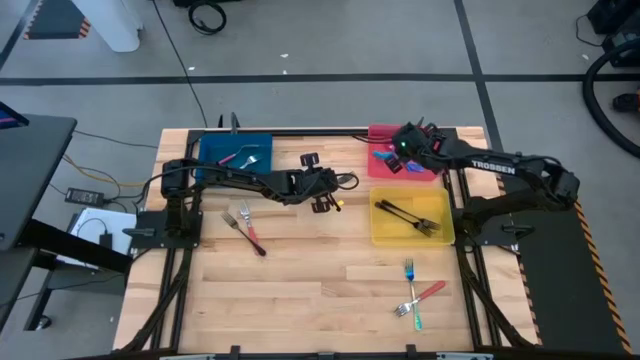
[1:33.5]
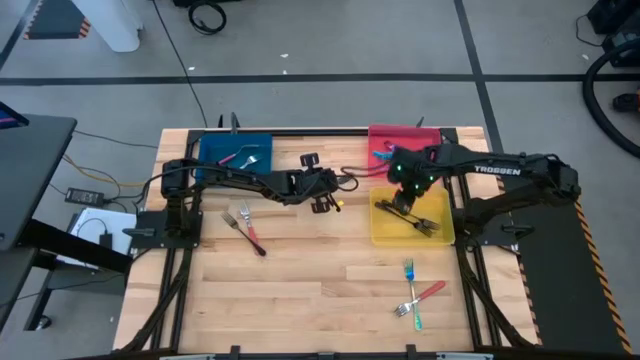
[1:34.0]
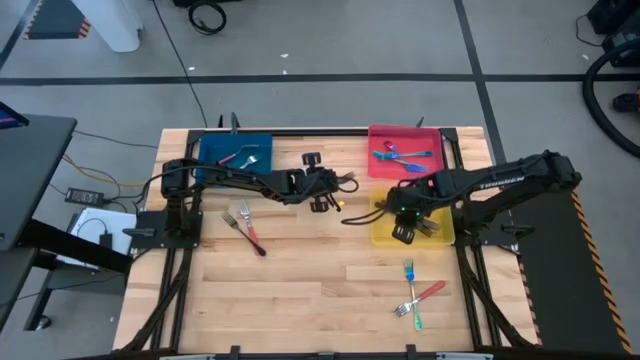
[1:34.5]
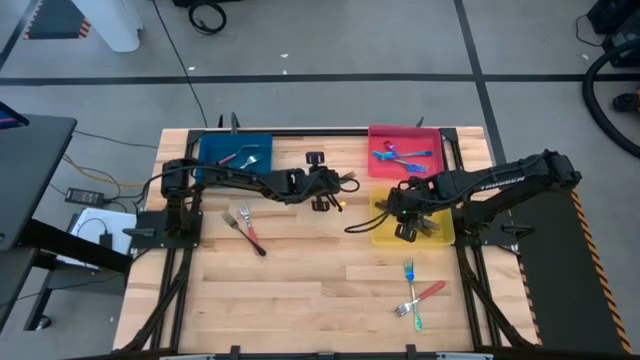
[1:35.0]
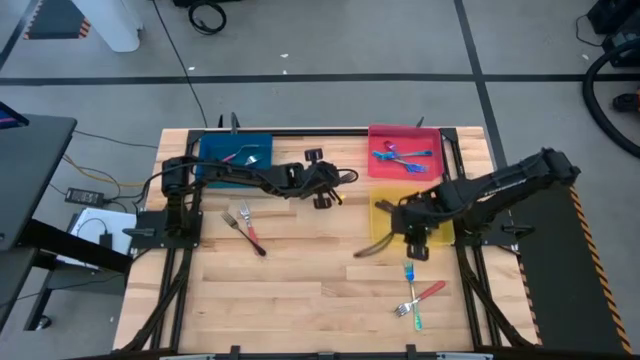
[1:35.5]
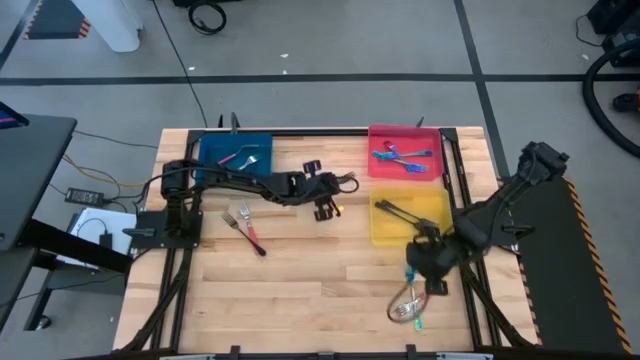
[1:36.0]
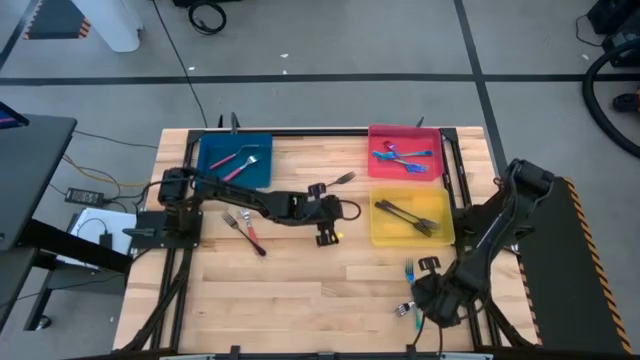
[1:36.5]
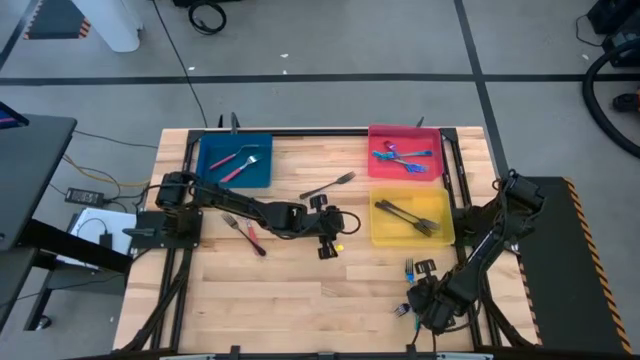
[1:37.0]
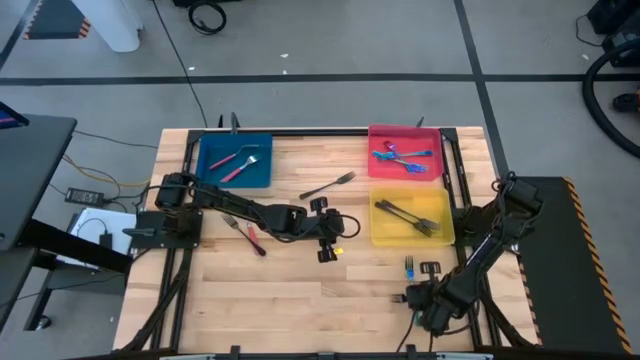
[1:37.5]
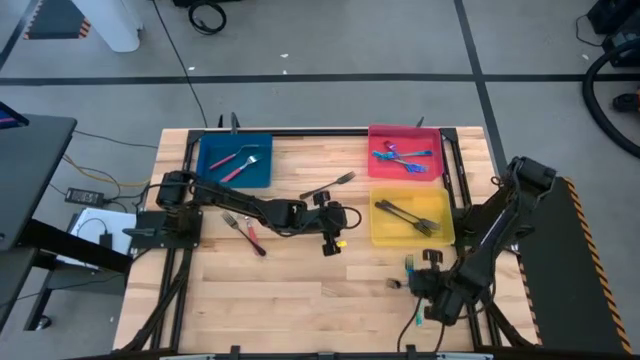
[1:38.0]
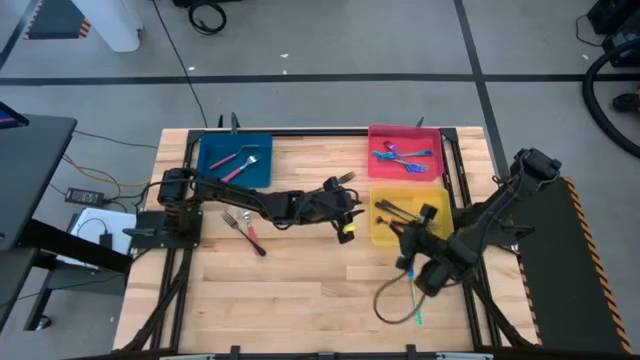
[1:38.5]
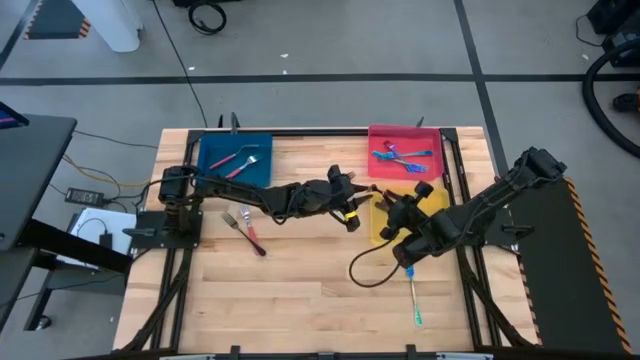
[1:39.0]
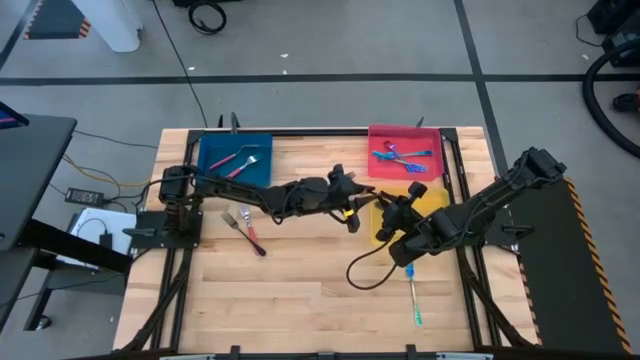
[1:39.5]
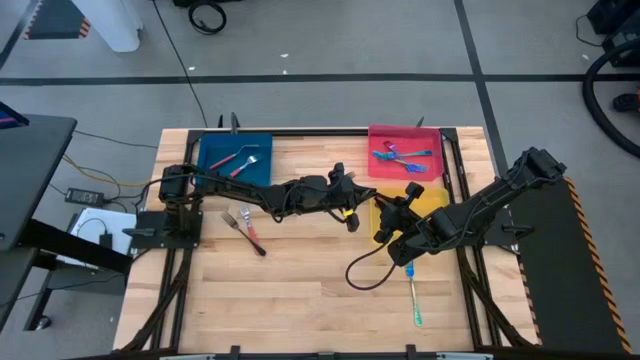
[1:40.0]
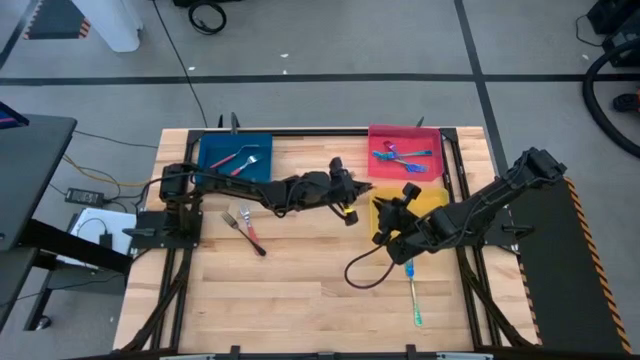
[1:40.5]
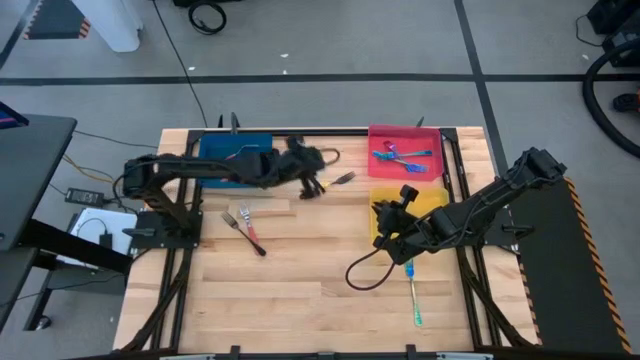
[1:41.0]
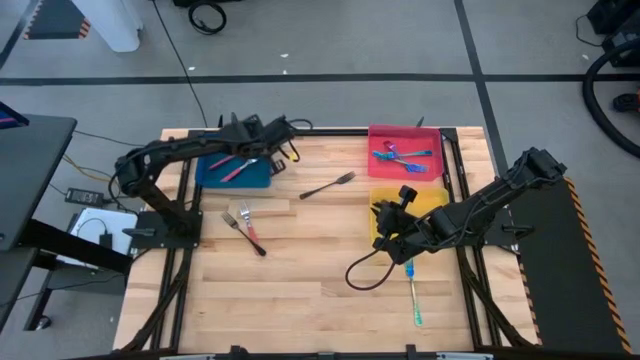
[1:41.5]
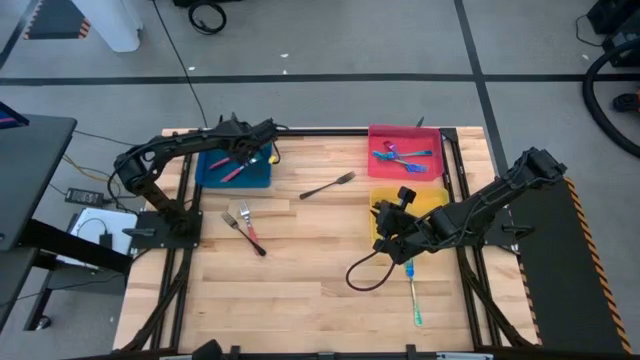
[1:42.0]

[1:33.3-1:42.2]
Task: Sort silverware by color (type)
Put the red fork into the blue bin

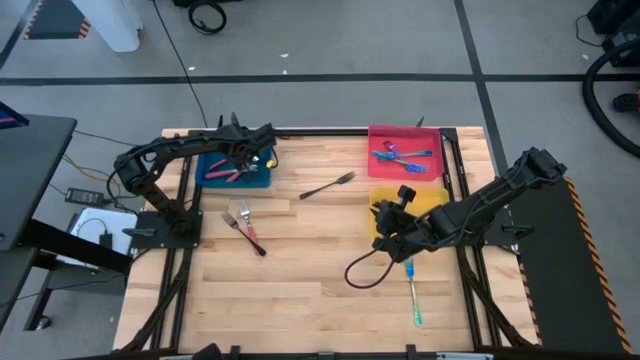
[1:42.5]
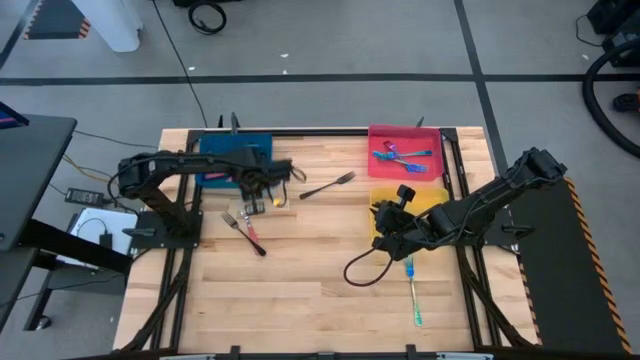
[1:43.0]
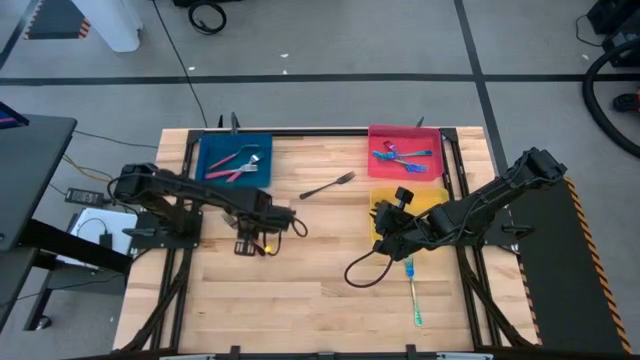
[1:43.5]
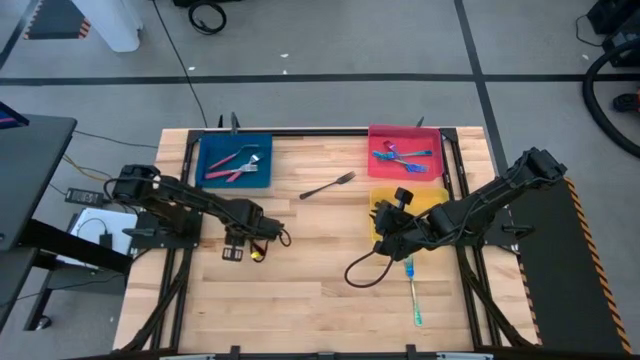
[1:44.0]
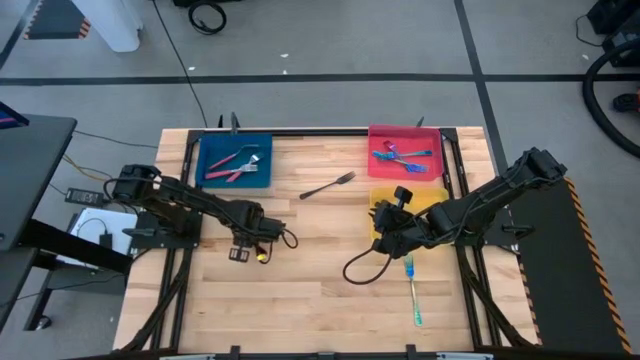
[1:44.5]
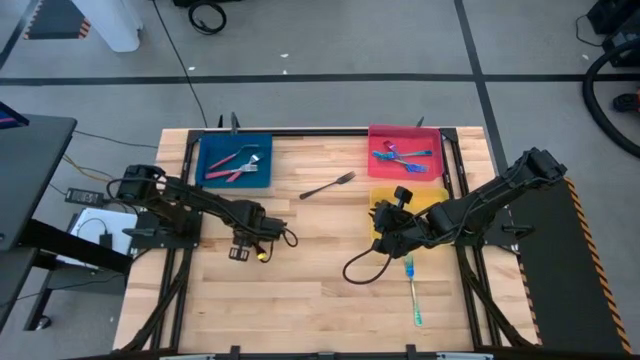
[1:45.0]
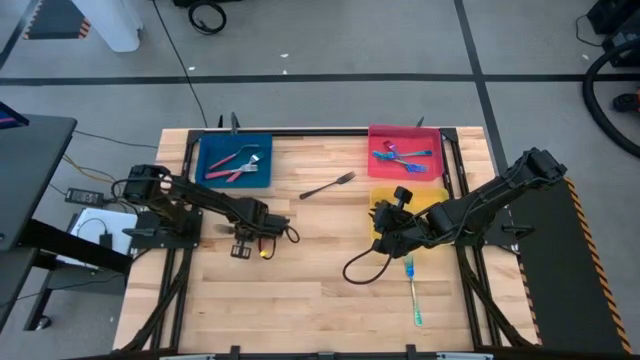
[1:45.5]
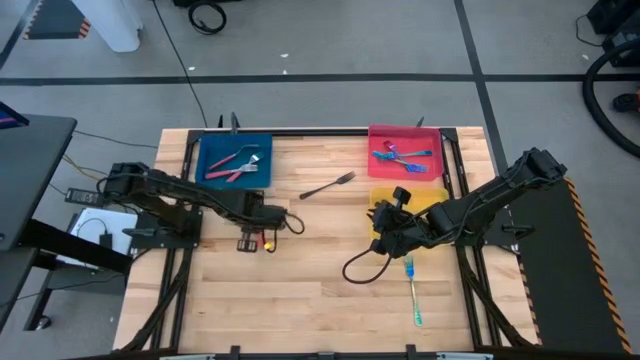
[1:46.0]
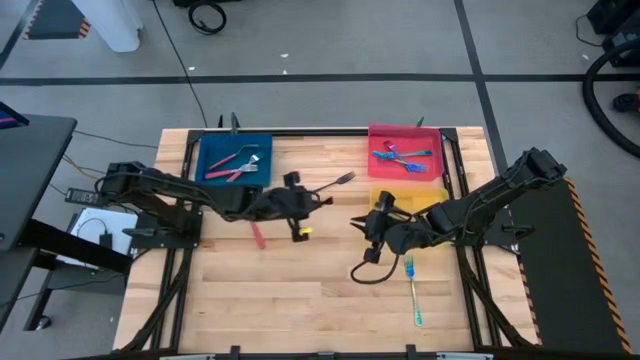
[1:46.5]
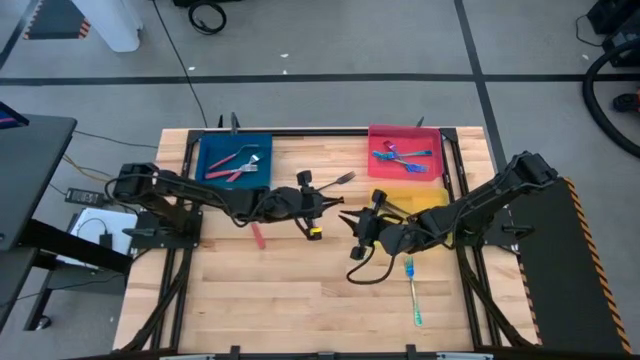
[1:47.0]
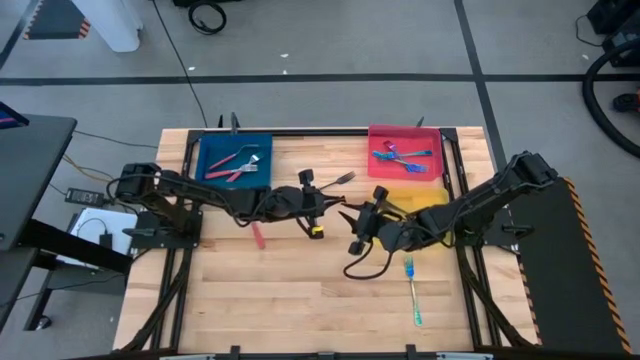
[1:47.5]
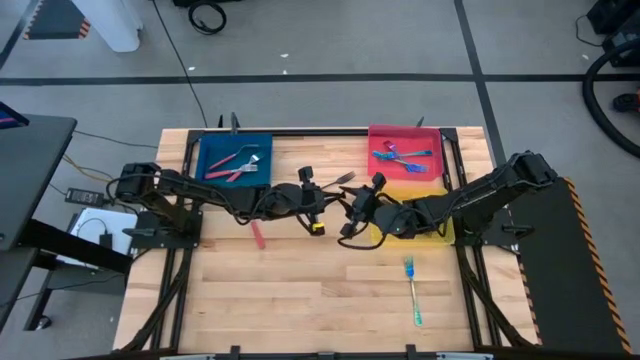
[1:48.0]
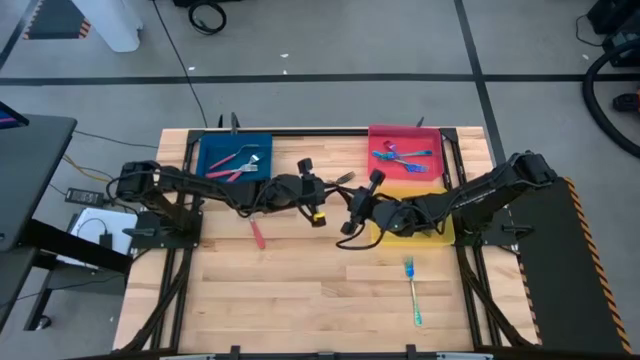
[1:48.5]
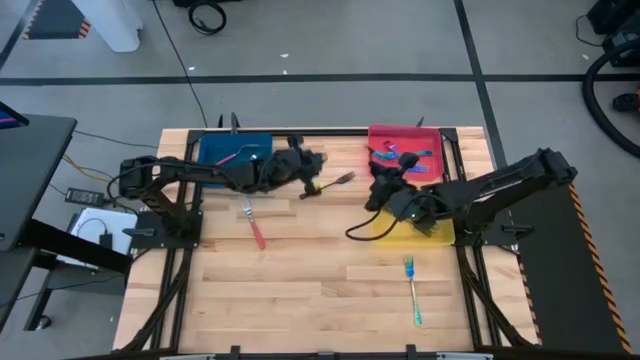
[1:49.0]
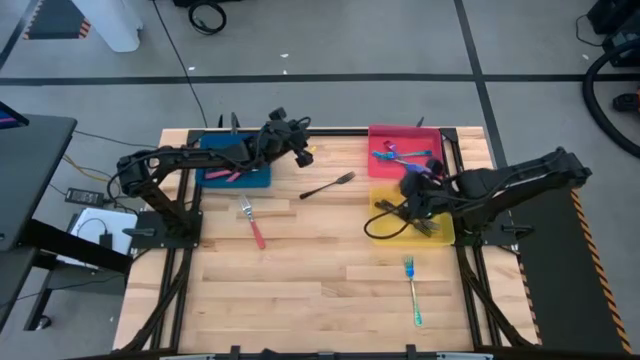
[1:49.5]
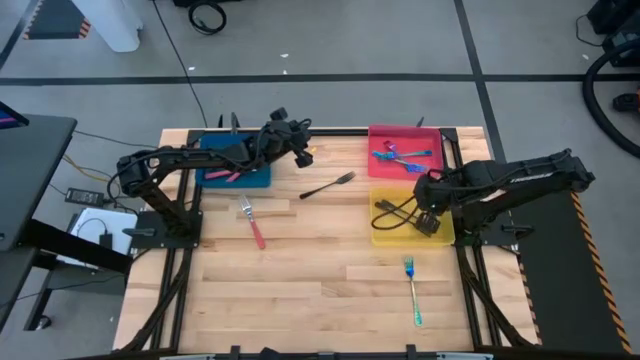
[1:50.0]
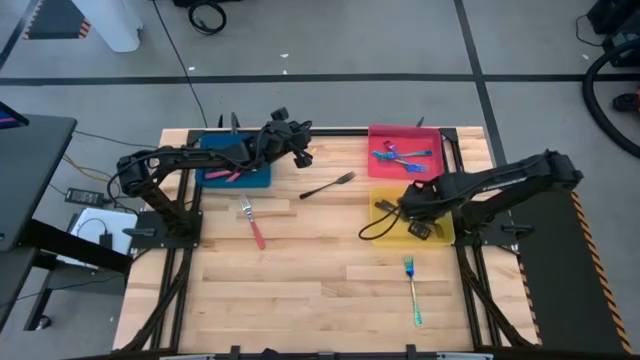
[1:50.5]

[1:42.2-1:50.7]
Put the black fork into the yellow bin

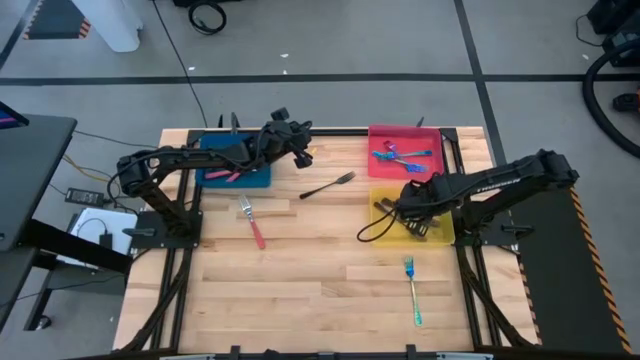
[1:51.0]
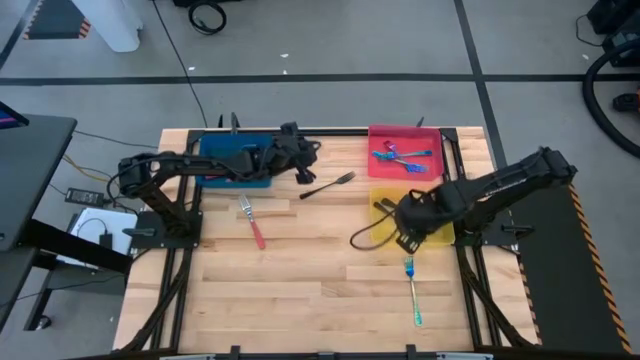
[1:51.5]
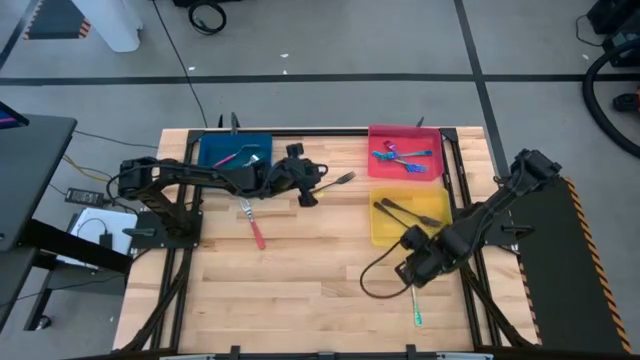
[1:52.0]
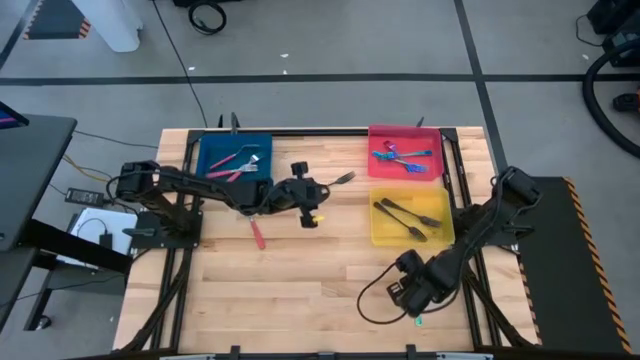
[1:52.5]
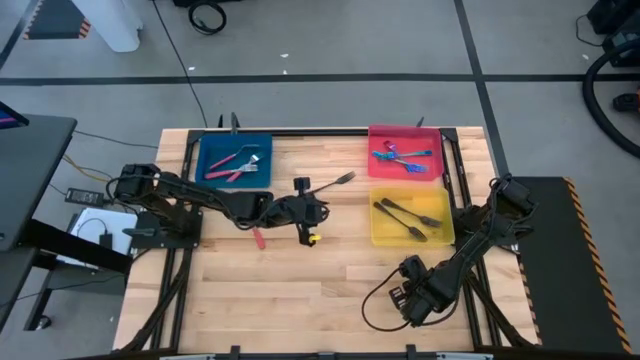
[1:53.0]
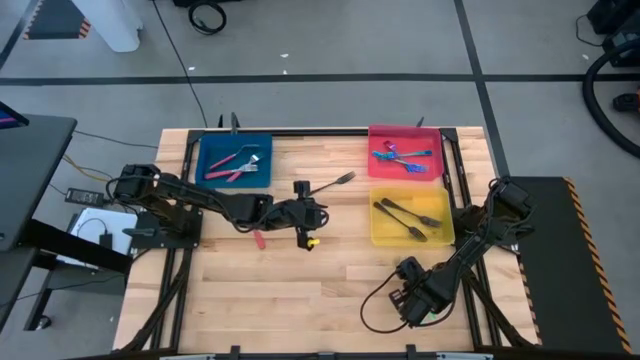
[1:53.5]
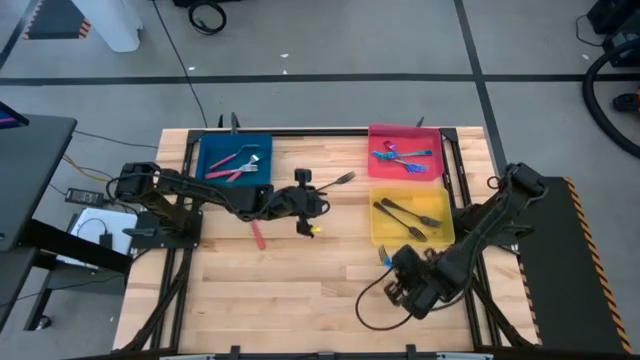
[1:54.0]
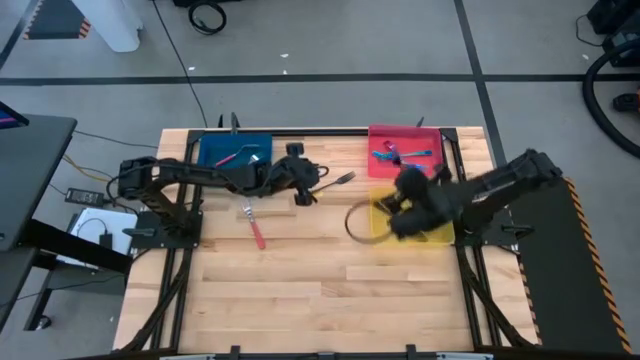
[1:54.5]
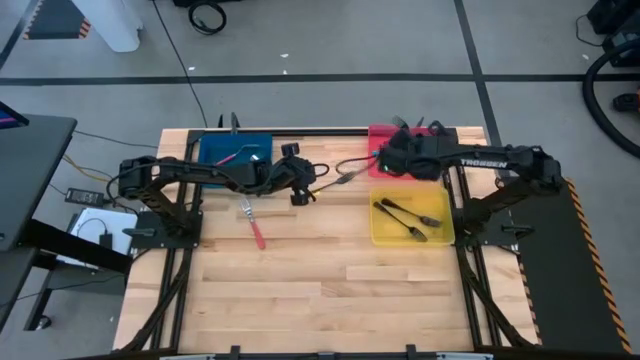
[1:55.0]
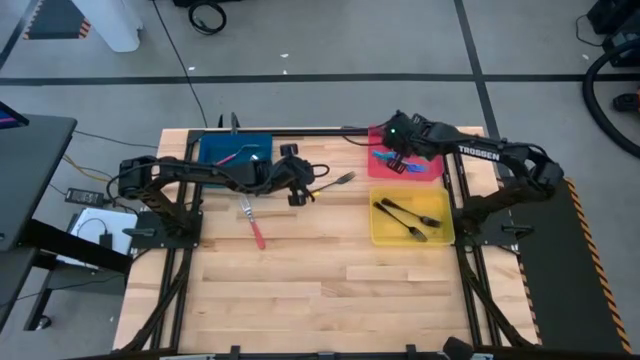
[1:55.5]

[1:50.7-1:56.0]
Put the blue fork into the red bin
